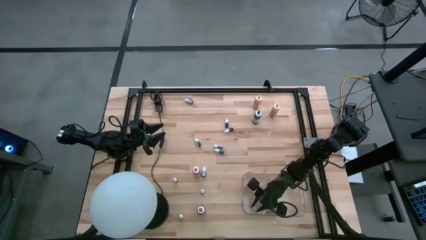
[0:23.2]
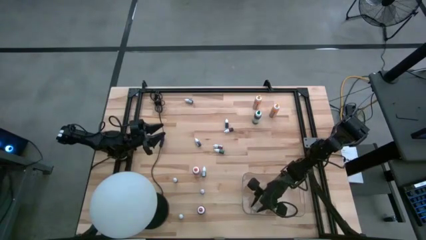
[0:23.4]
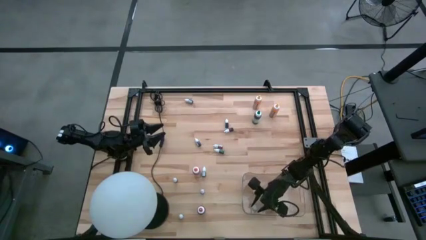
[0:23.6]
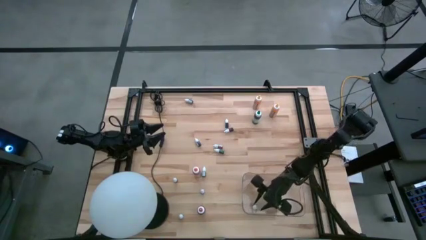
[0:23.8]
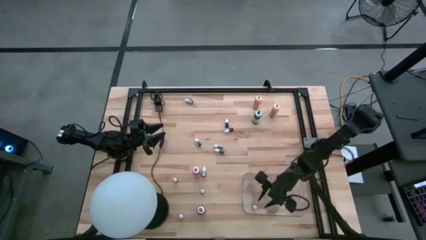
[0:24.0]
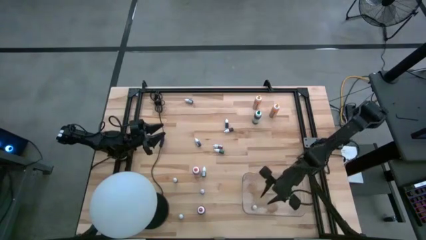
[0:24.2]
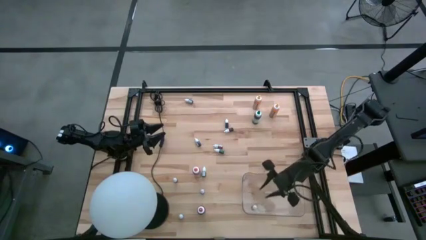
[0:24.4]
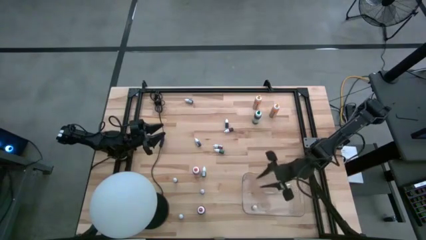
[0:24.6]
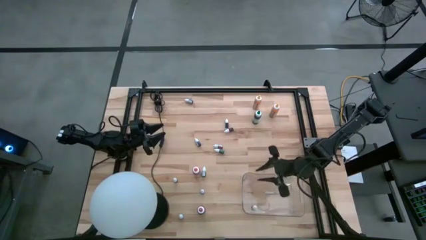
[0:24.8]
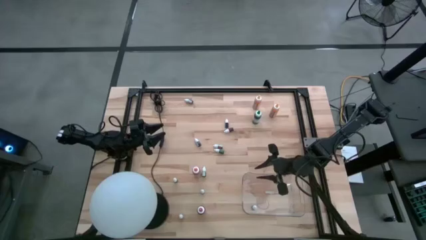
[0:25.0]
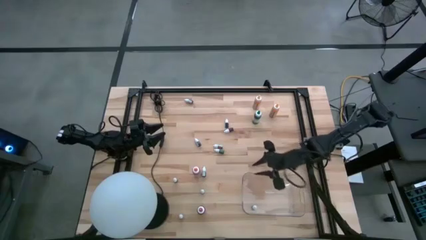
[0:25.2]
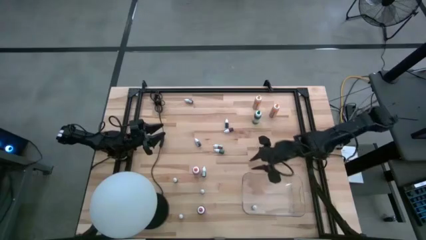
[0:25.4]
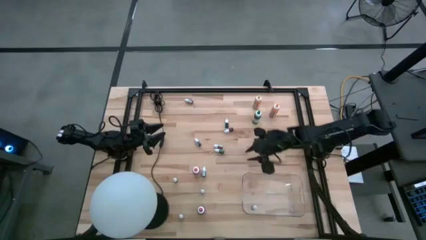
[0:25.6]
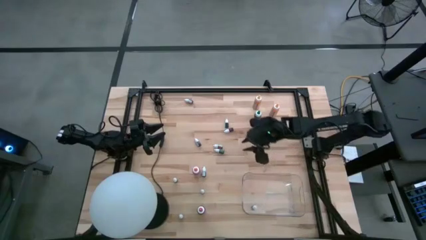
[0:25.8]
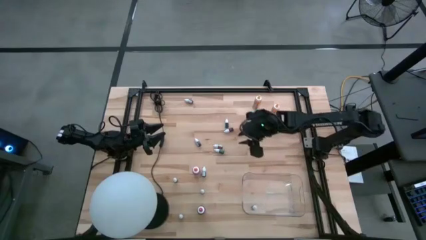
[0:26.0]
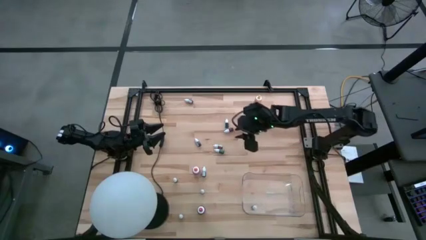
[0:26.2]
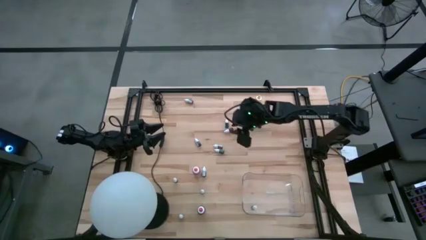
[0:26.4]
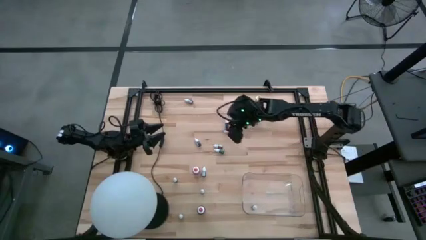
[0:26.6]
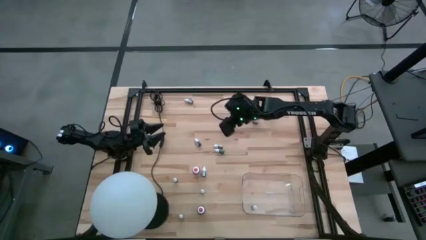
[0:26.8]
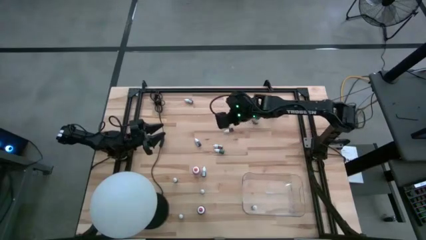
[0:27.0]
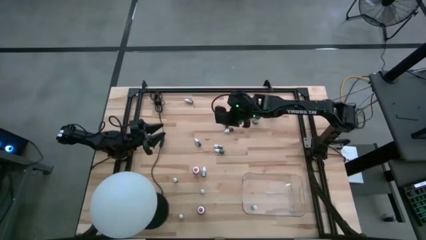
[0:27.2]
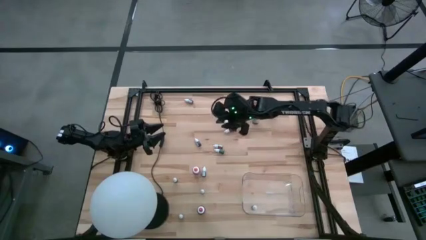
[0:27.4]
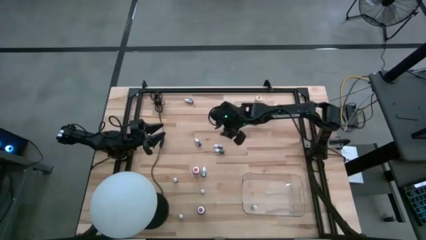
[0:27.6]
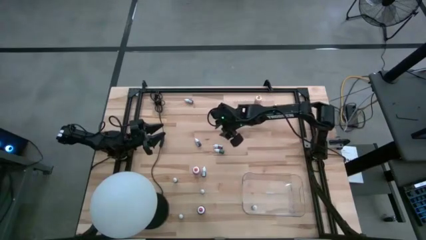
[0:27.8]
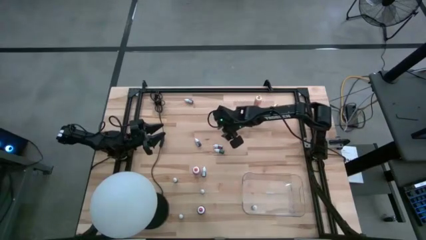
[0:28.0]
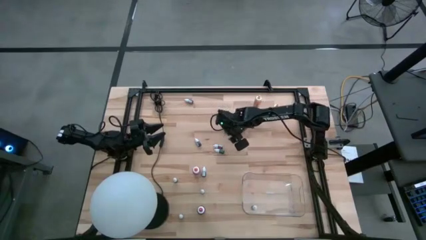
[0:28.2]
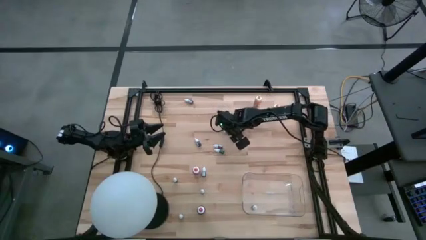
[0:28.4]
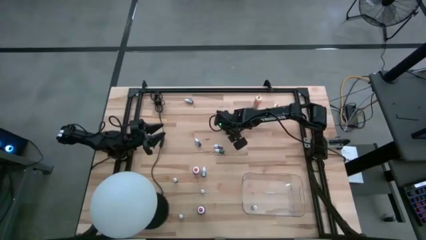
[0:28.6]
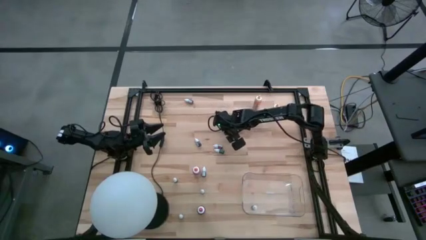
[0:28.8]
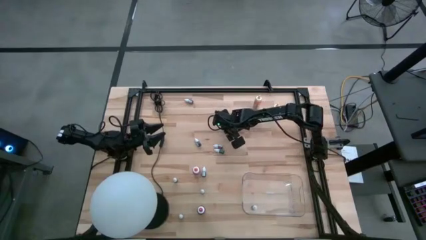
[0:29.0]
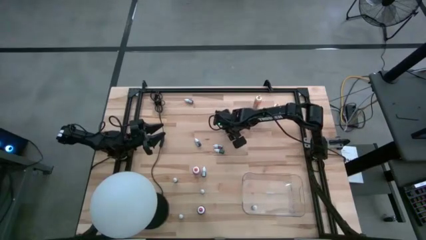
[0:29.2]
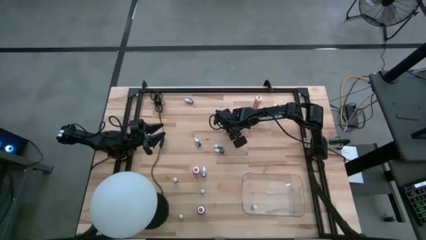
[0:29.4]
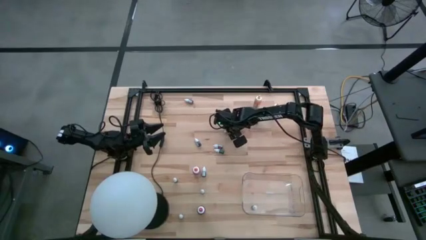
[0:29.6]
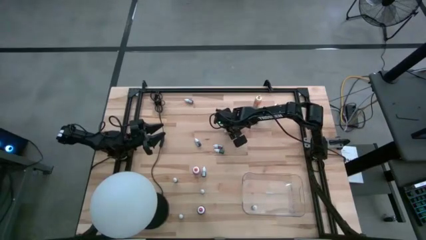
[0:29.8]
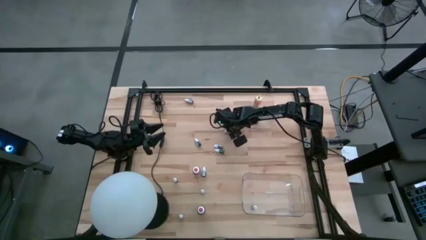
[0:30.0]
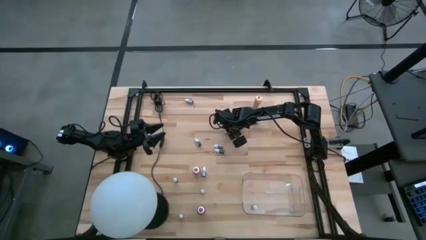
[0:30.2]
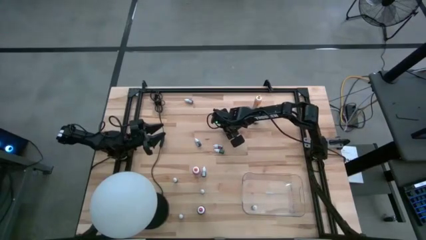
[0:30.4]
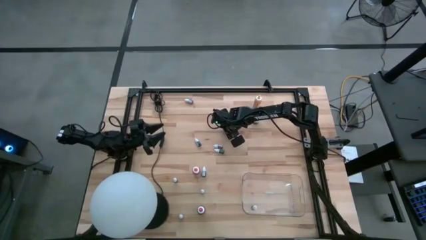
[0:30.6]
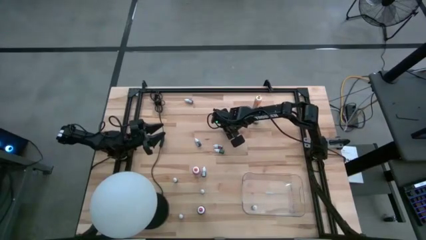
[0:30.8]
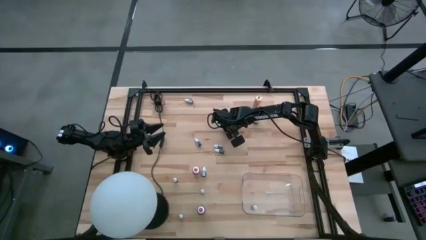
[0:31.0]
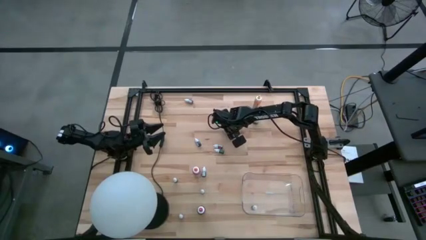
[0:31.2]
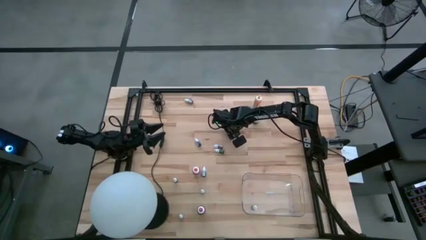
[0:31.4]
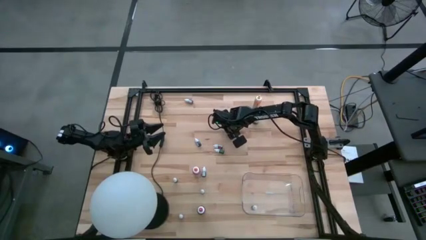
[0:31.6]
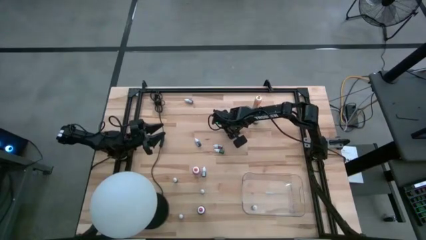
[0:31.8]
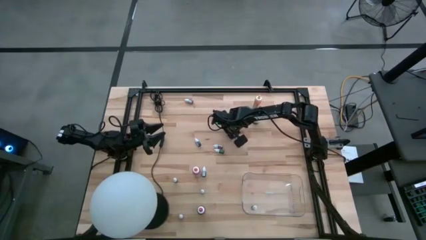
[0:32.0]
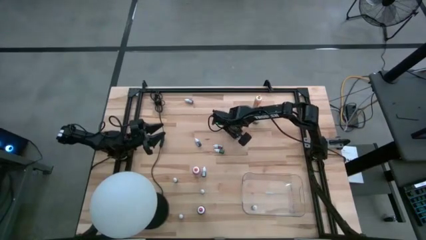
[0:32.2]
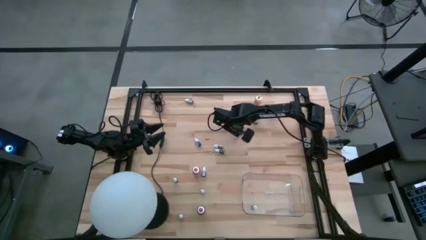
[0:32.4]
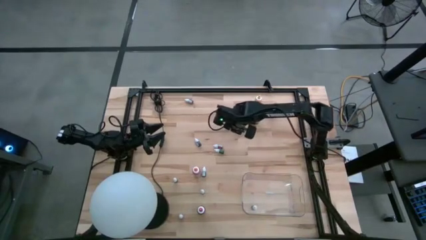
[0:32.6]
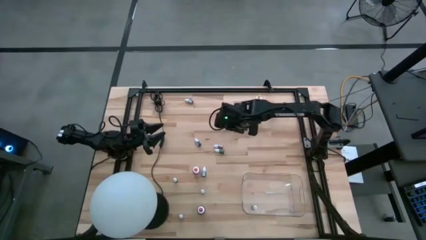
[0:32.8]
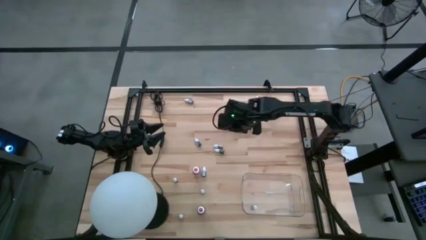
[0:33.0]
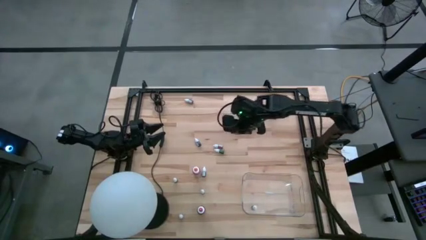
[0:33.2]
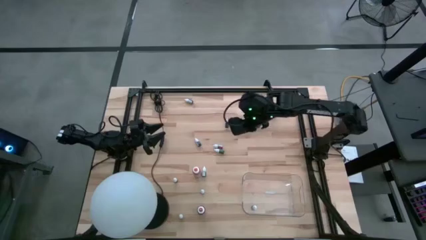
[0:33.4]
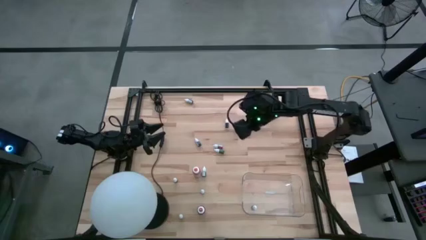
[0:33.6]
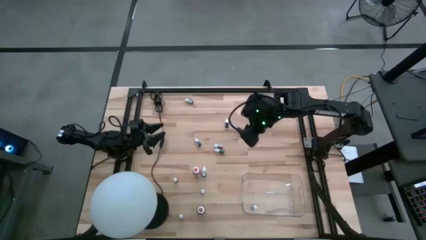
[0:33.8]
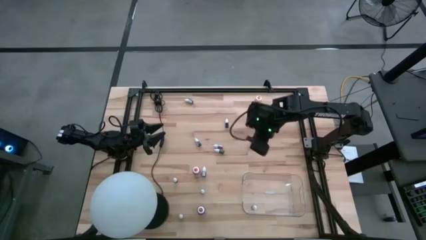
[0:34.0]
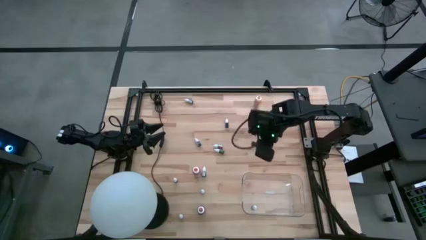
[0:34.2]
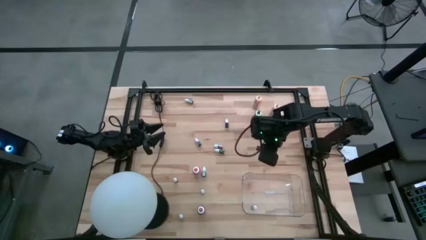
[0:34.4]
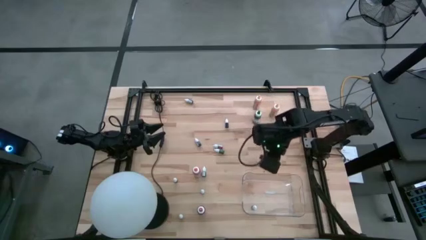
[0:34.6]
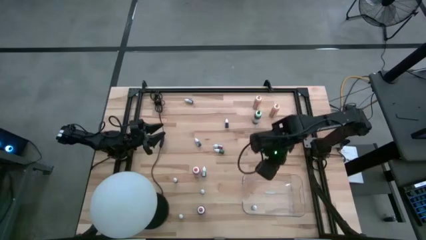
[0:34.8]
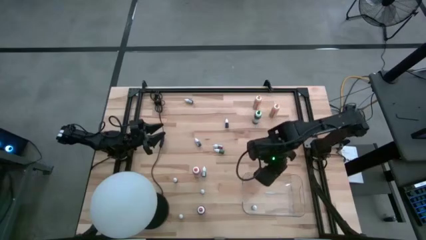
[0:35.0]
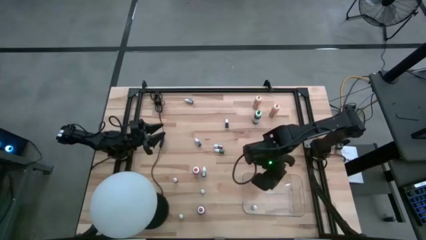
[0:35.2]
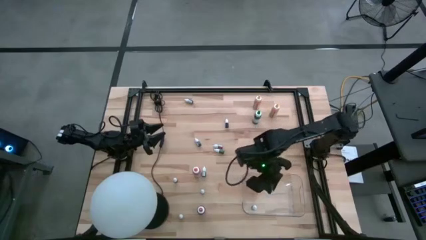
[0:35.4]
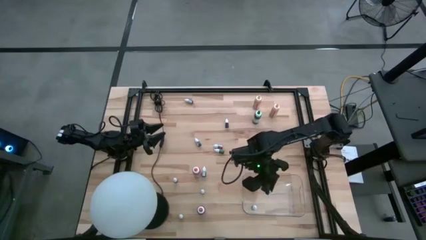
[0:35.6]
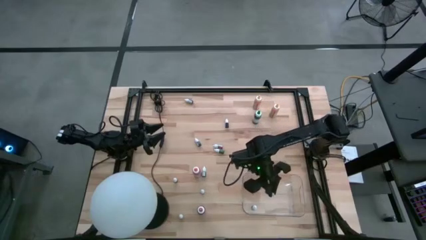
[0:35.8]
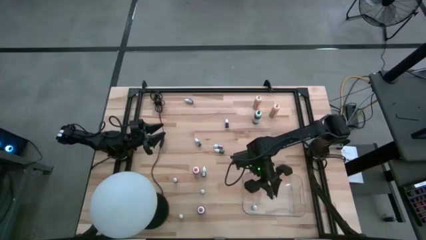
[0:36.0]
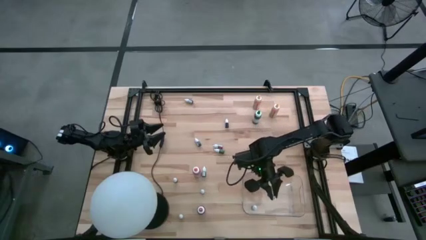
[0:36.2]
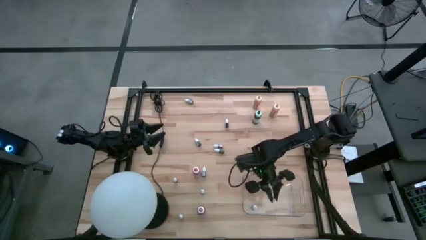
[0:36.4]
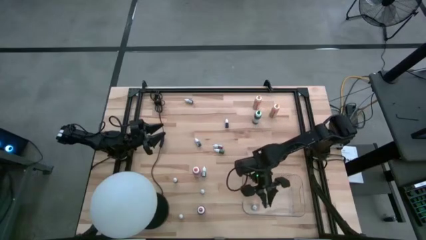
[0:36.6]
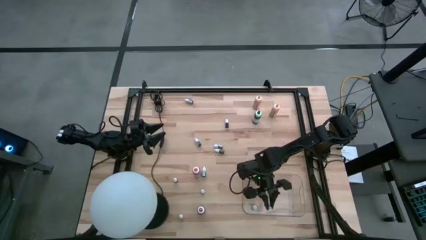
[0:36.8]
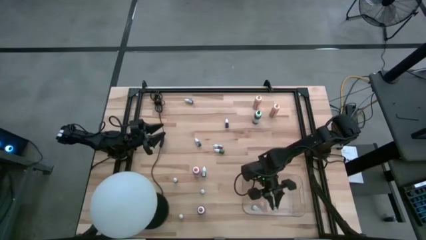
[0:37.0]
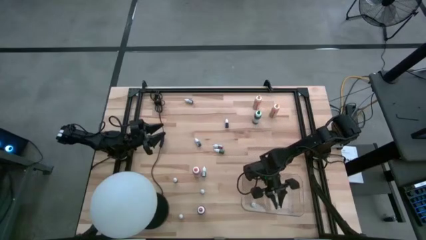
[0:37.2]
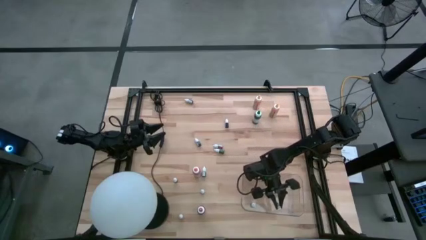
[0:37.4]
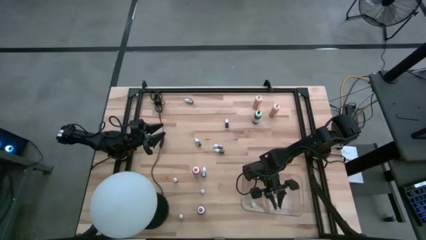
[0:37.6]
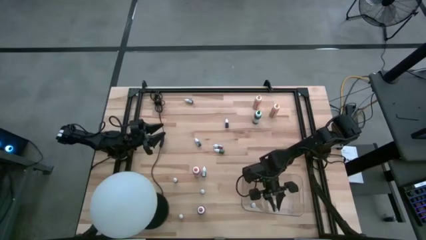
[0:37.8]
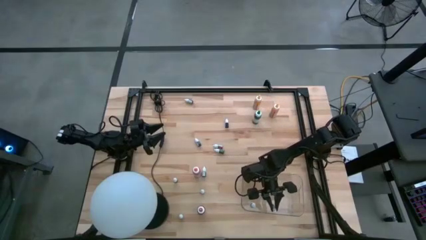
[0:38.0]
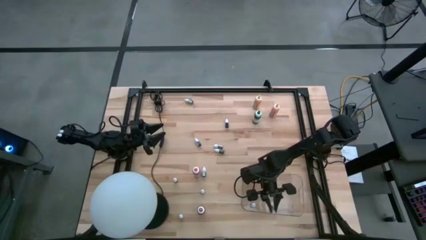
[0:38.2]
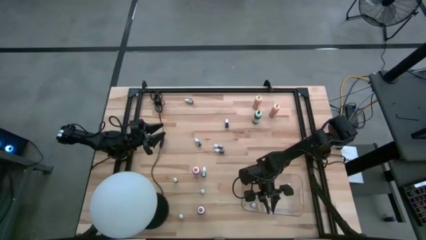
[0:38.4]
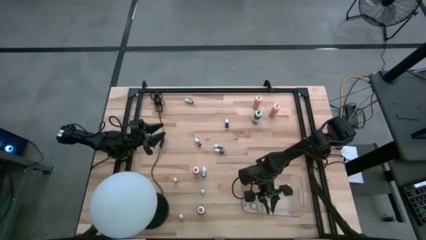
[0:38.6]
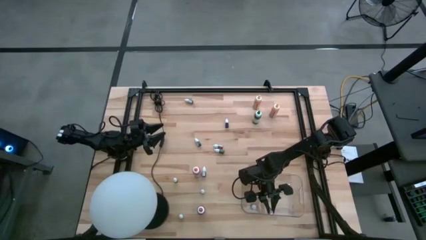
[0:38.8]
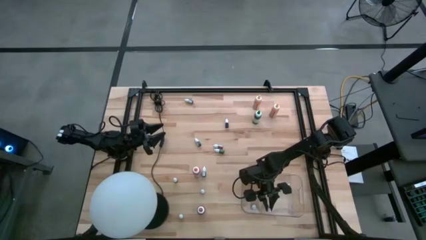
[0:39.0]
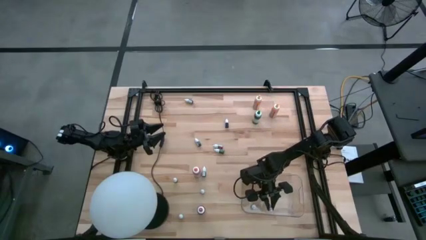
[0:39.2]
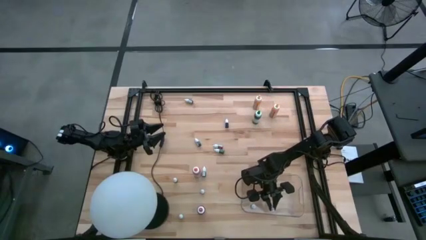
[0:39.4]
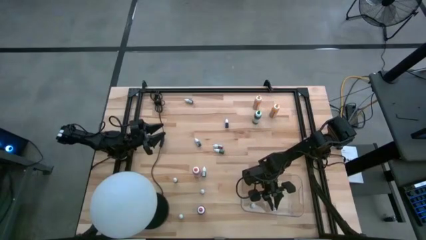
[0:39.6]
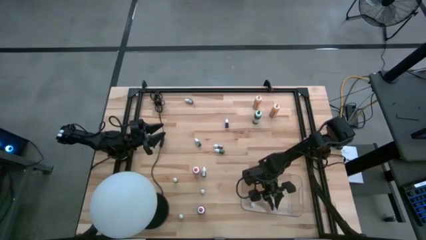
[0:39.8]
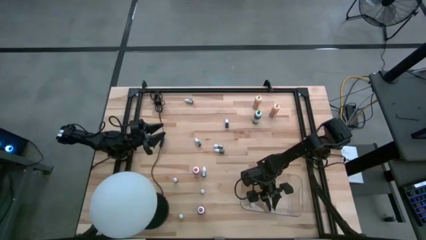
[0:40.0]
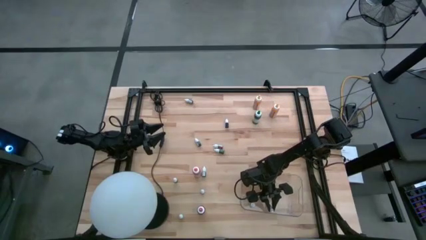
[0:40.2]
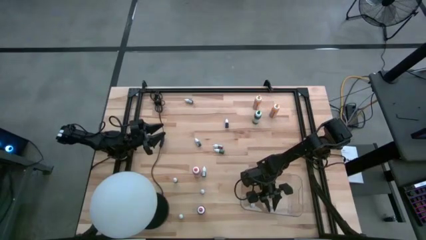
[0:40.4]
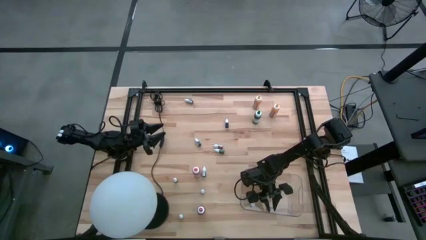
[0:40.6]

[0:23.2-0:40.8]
Task: Pick & Place food coloring
Put the brown food color into the transparent bin
